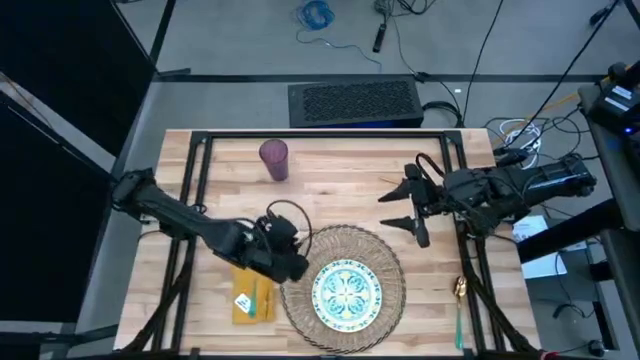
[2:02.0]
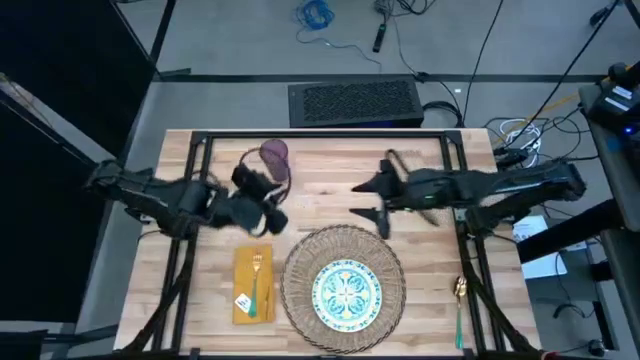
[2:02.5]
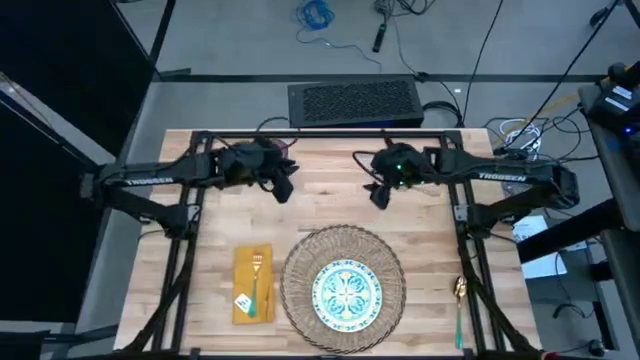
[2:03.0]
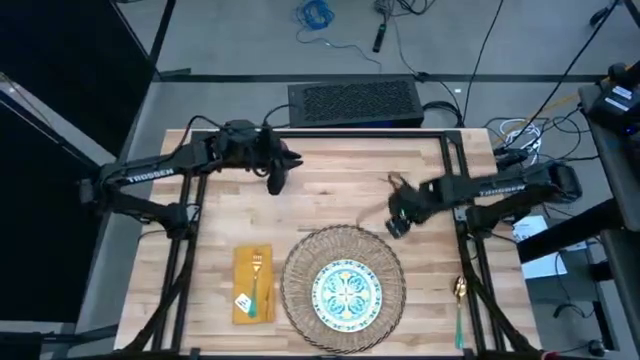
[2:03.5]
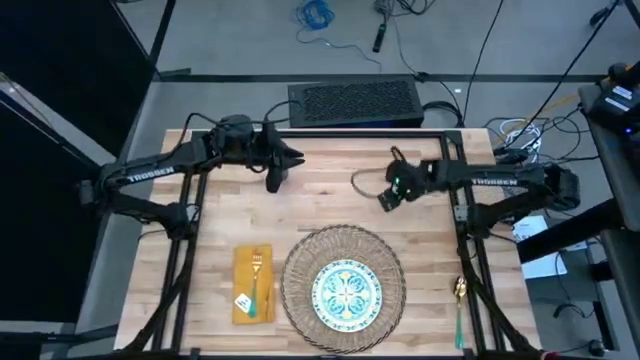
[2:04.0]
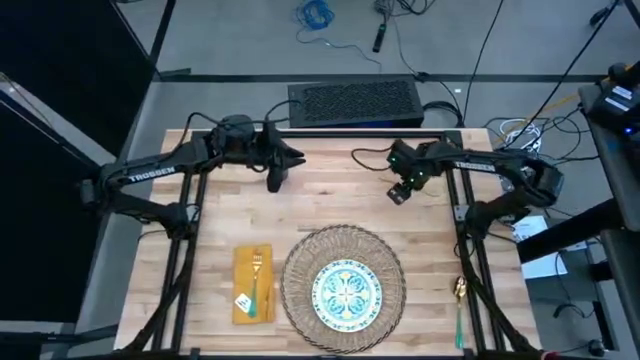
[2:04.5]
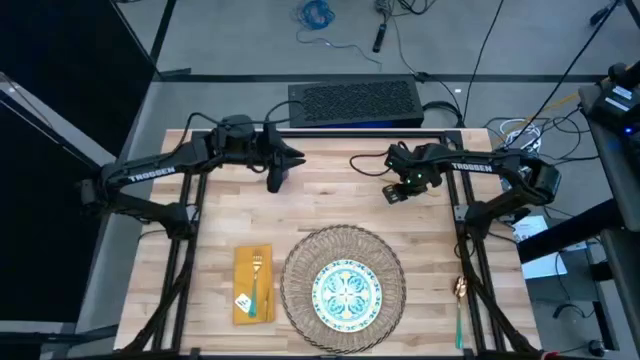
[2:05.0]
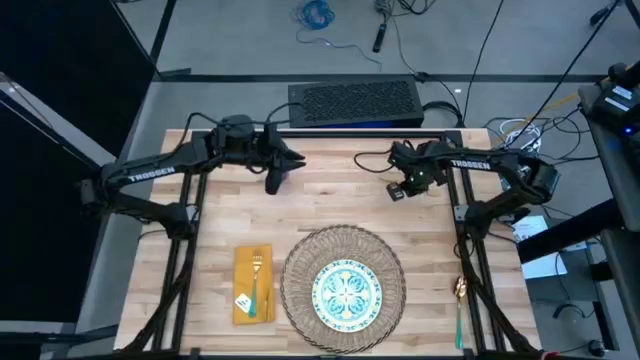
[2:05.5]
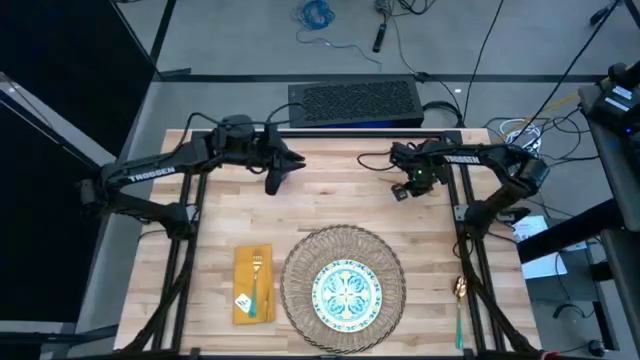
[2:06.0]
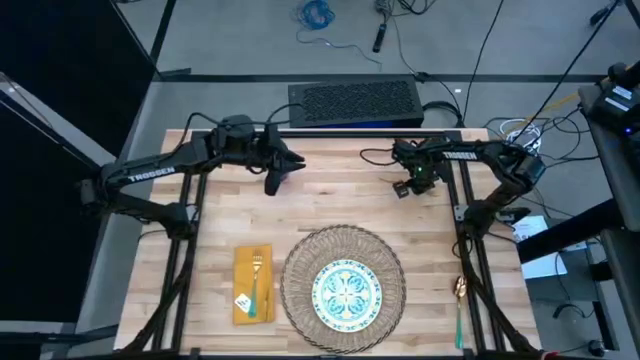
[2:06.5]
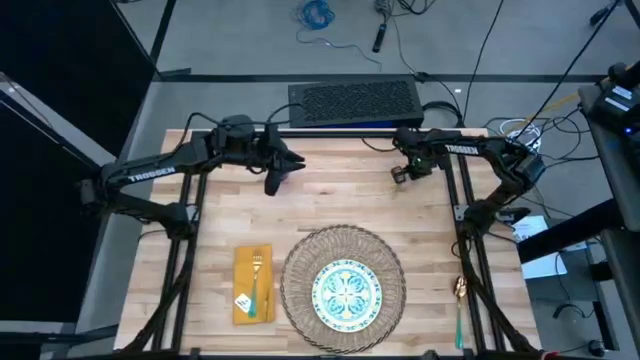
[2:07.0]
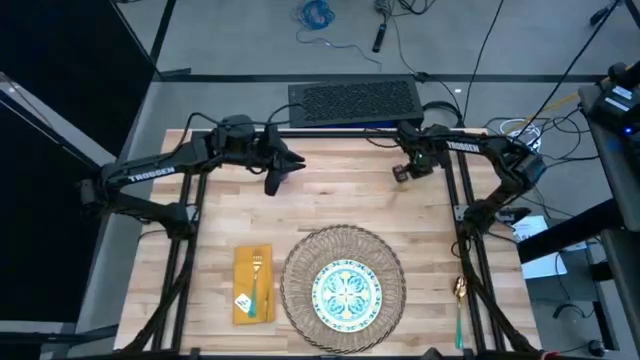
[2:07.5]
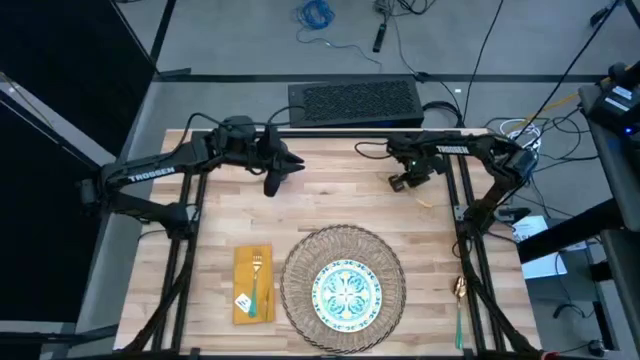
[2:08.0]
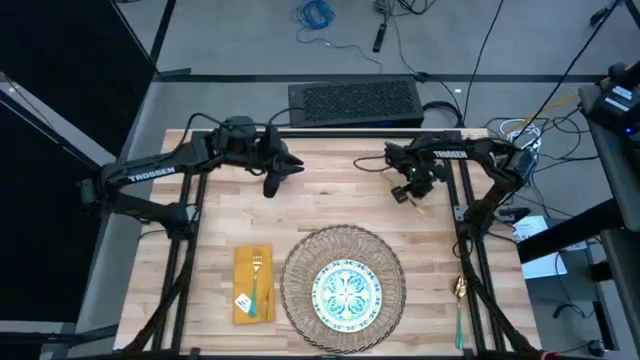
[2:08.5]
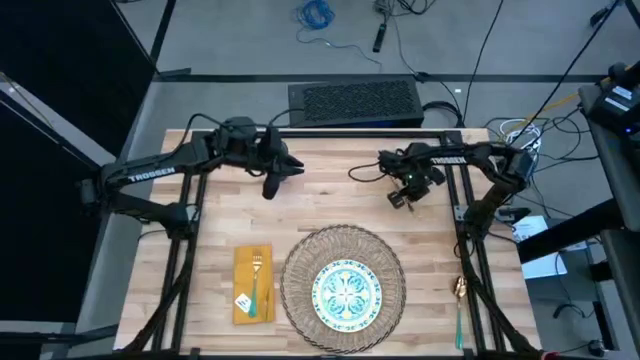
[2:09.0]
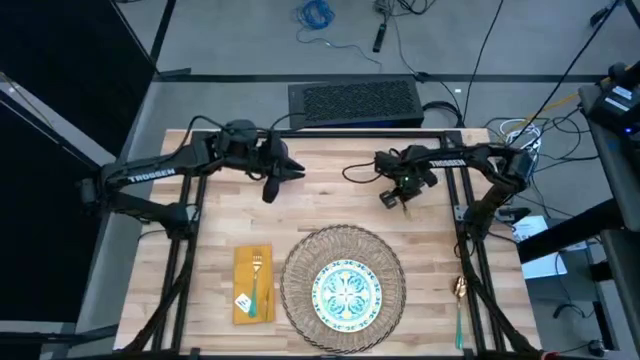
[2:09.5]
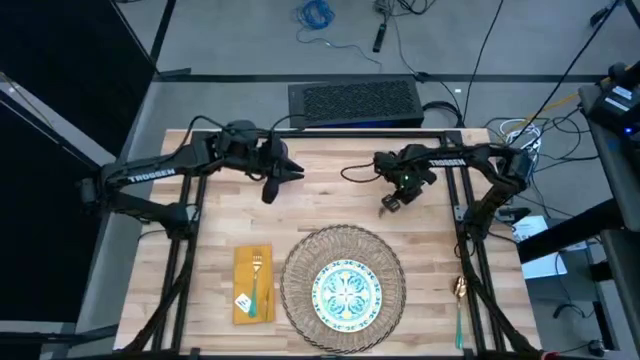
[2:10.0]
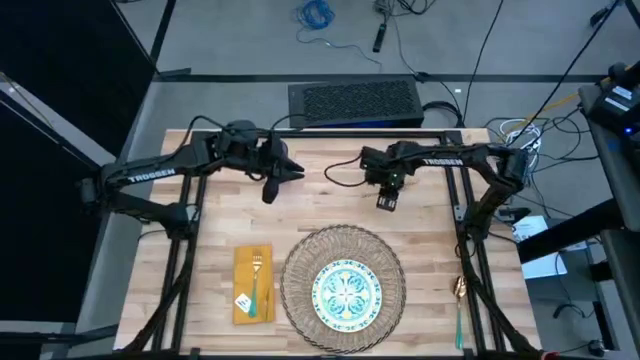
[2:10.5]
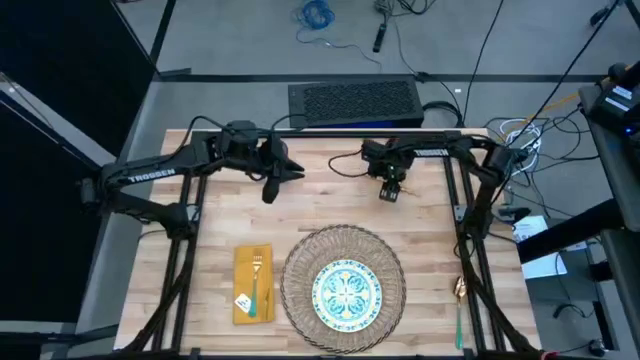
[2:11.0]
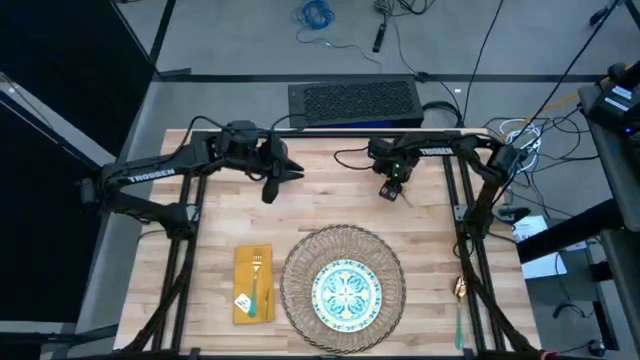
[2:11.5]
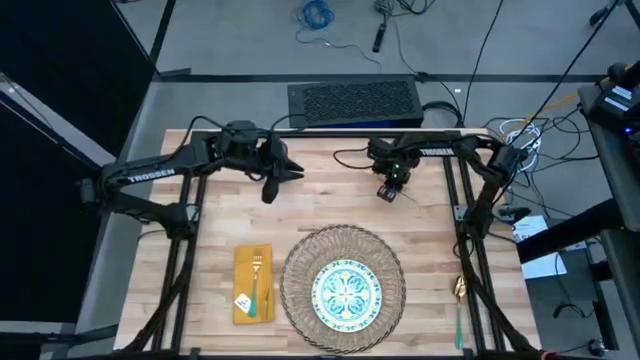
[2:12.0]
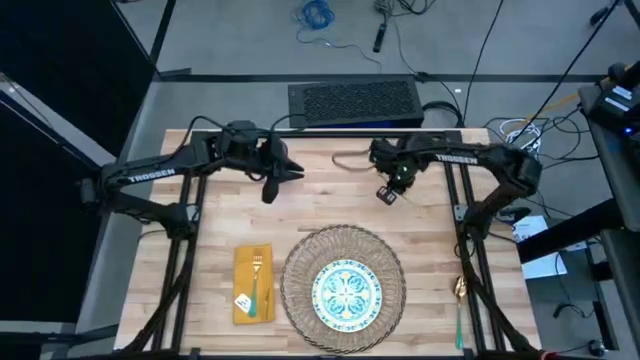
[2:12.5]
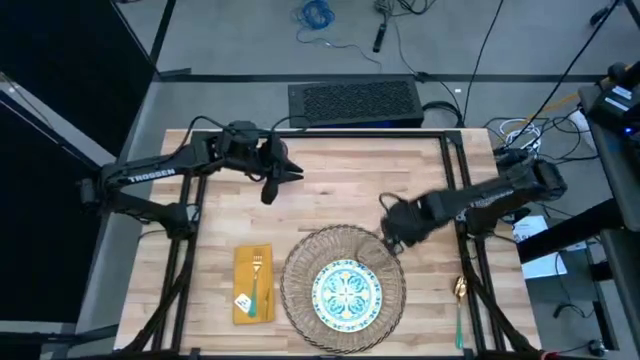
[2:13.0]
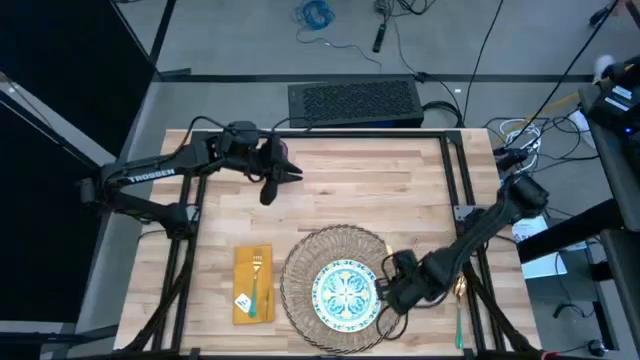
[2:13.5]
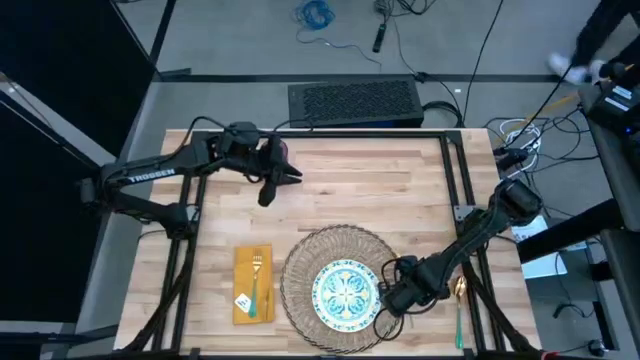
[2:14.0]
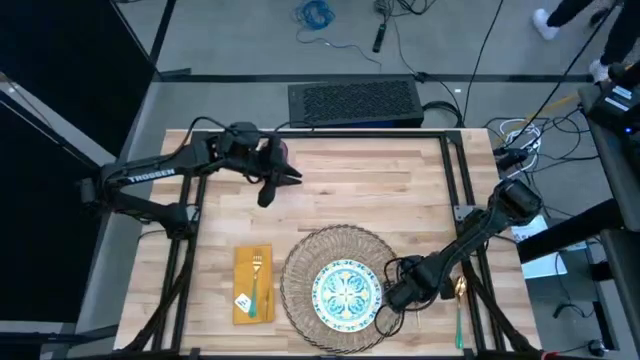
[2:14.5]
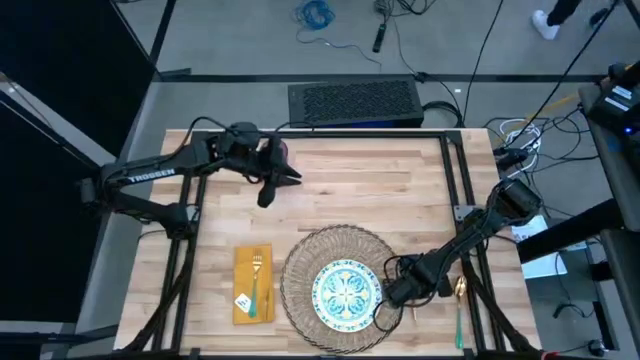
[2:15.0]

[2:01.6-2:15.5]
Task: Set table place
Put the gold knife to the right of the brown placemat

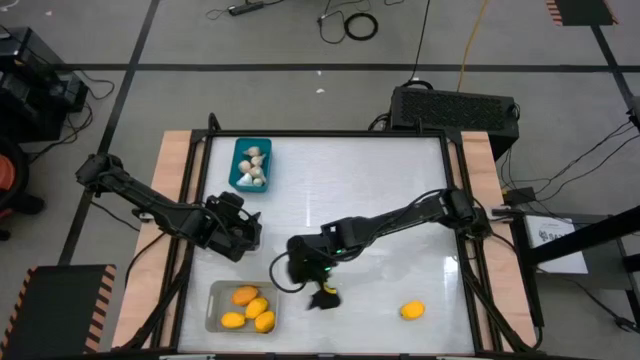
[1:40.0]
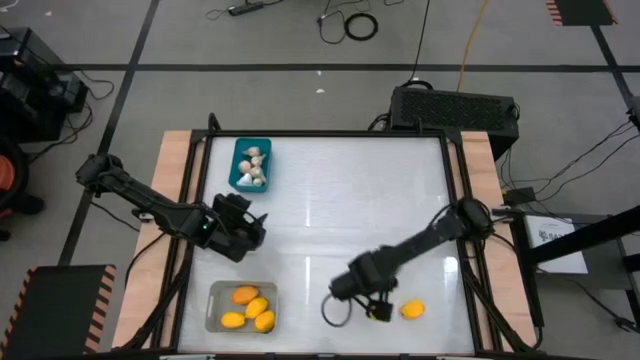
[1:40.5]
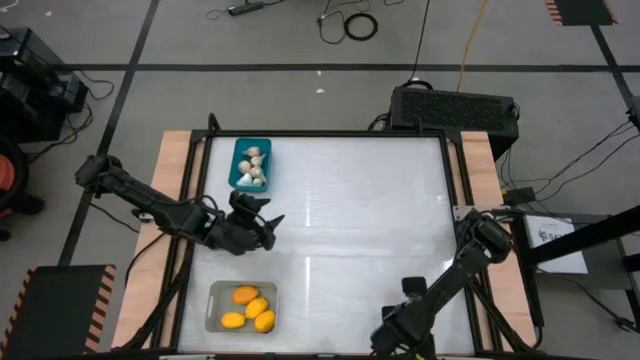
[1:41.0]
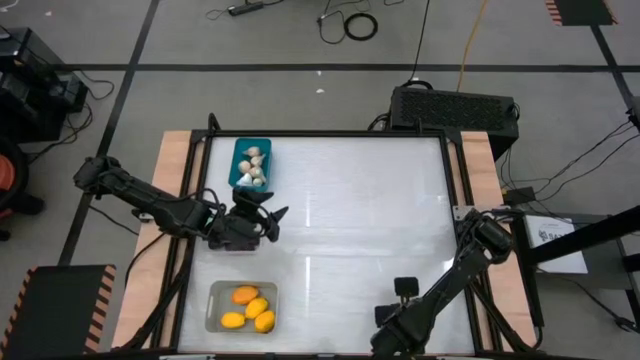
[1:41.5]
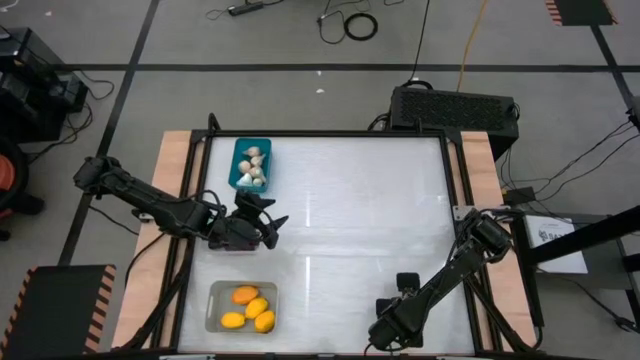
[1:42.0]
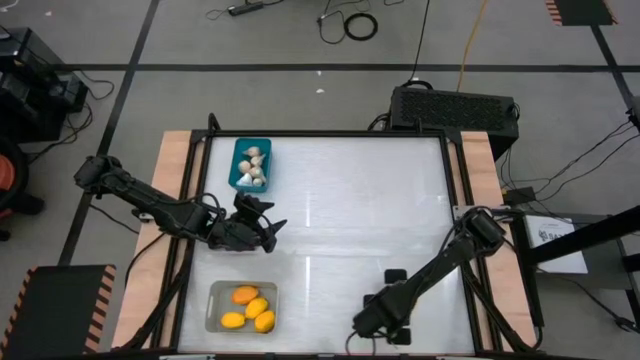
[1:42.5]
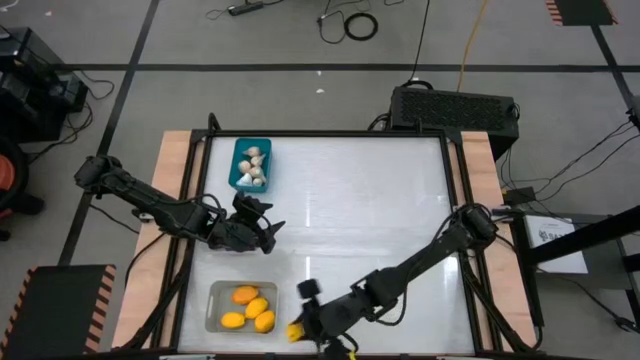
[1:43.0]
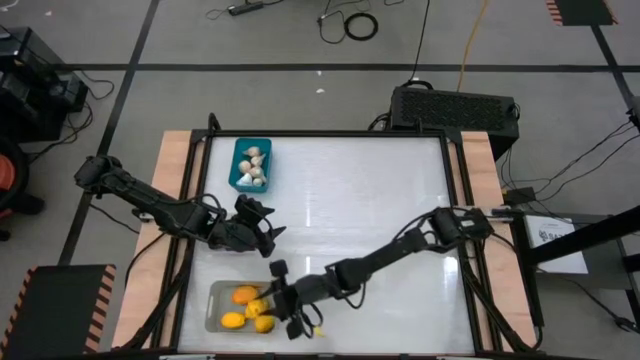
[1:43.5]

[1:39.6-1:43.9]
Task: Sort produce into baskets
Put the lemon into the gray bin
